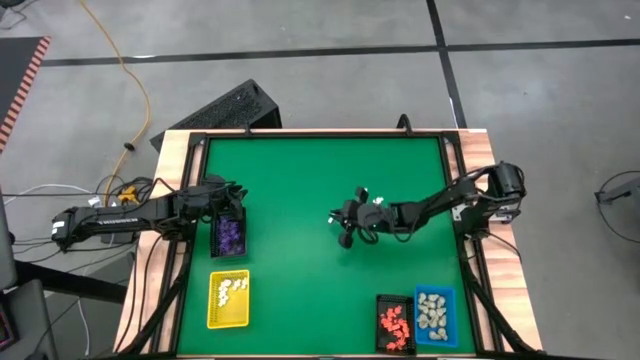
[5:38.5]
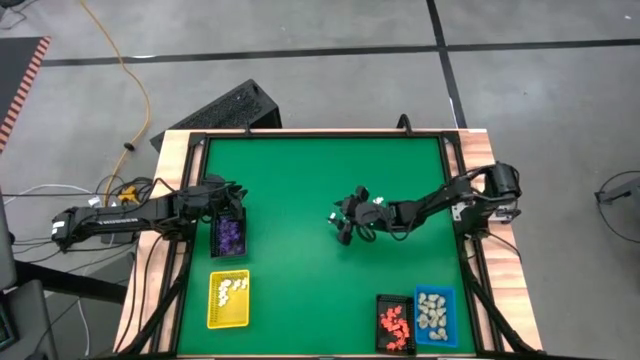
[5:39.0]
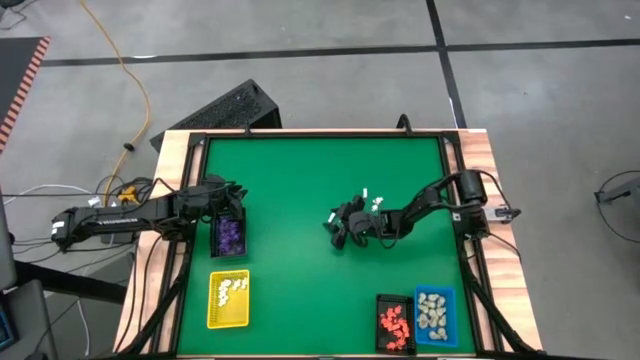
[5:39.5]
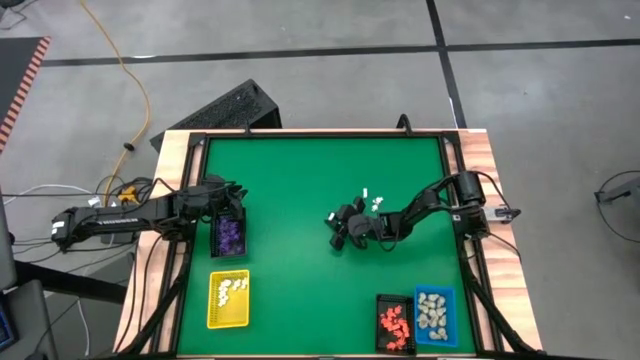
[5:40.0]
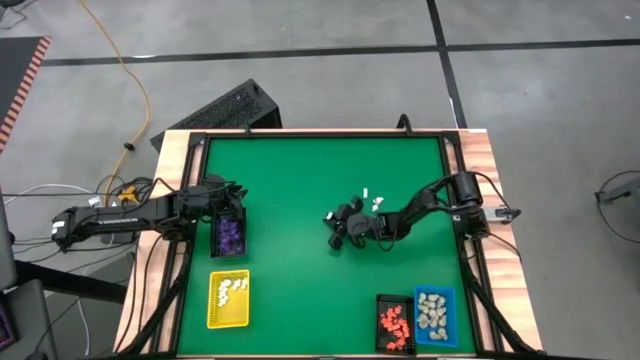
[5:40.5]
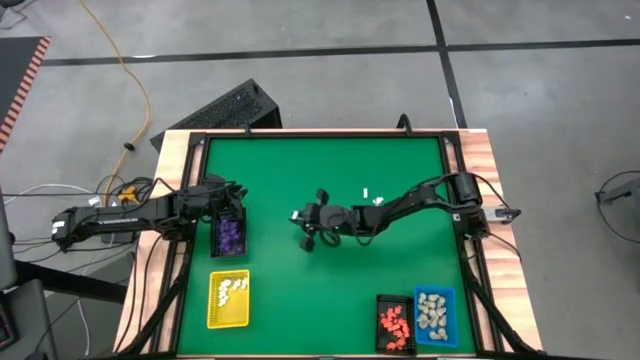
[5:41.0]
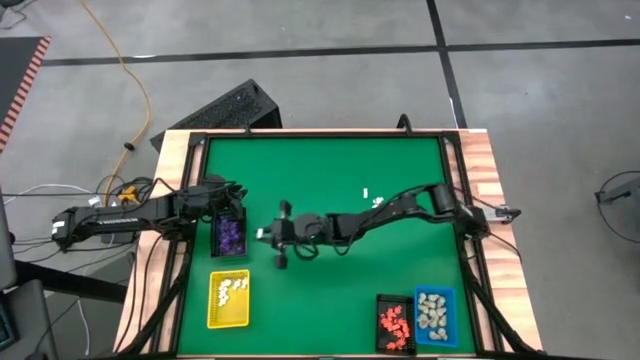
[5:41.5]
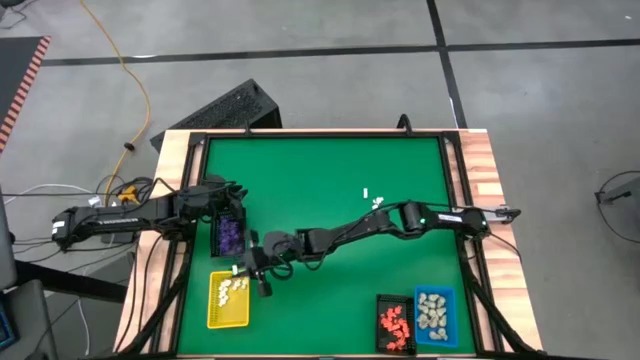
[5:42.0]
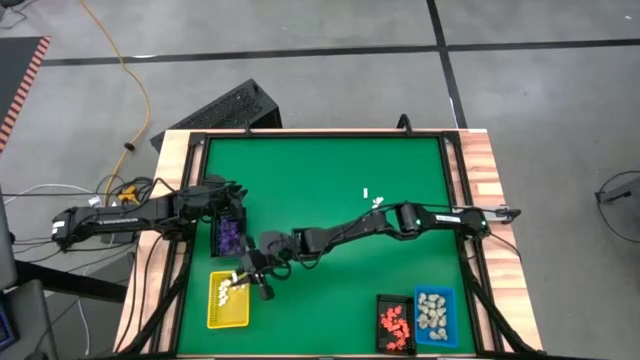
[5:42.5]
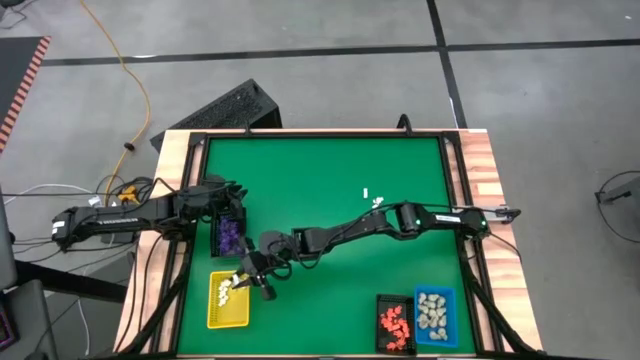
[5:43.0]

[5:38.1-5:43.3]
Task: Sort Halloween decoration
Put the white skeleton toy into the yellow basket

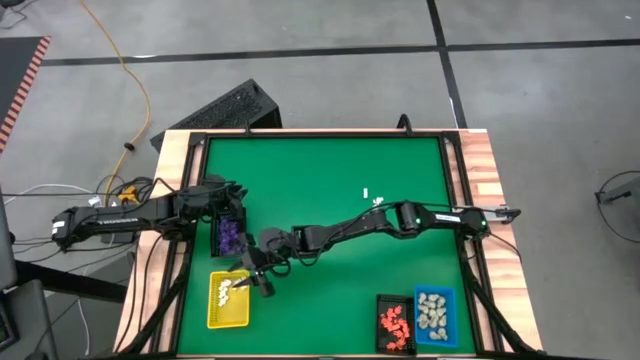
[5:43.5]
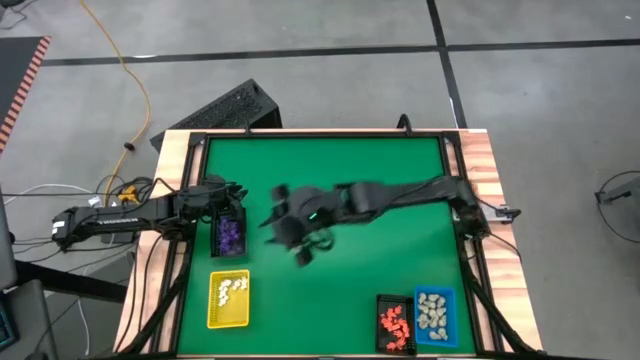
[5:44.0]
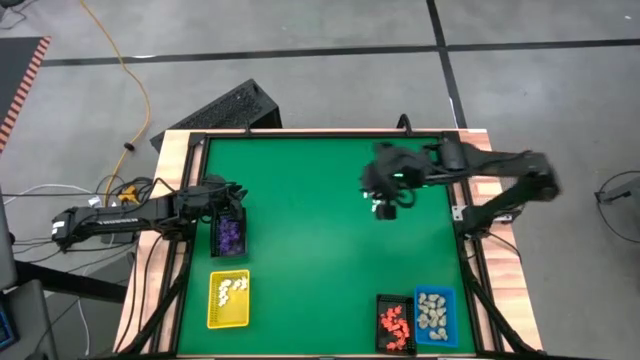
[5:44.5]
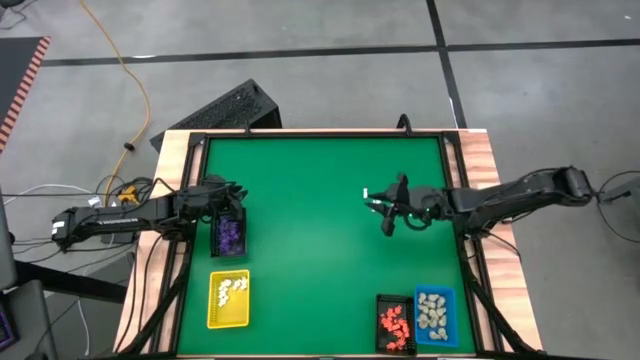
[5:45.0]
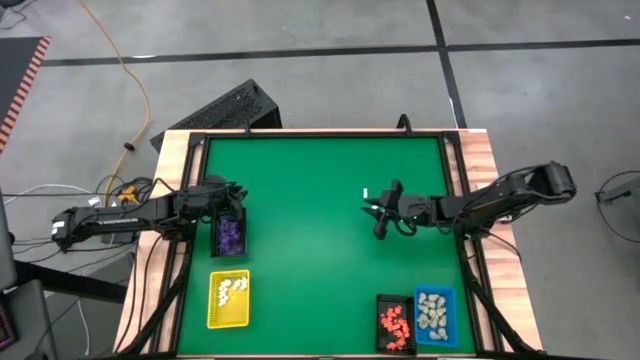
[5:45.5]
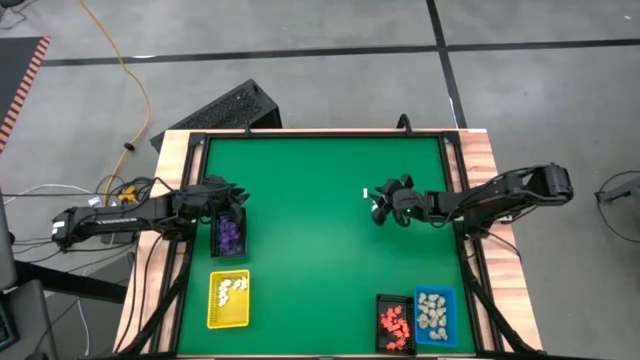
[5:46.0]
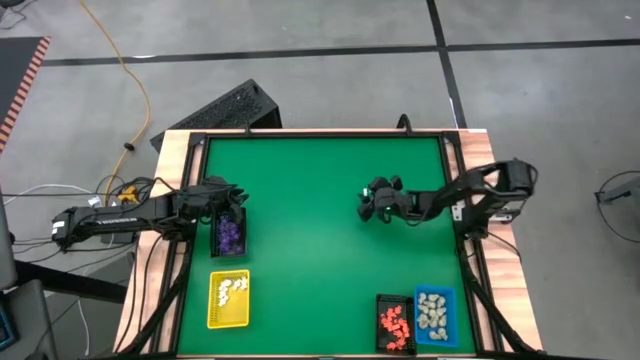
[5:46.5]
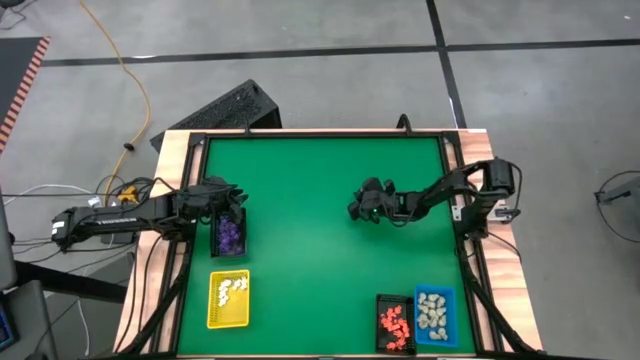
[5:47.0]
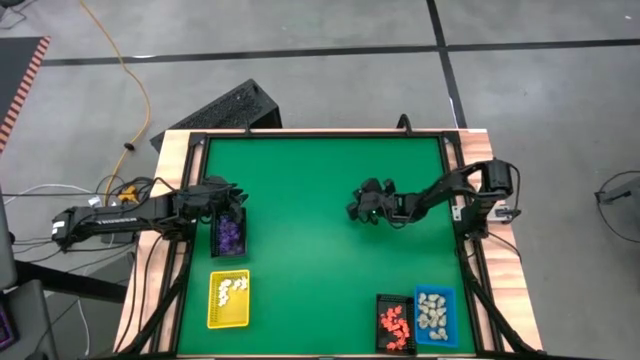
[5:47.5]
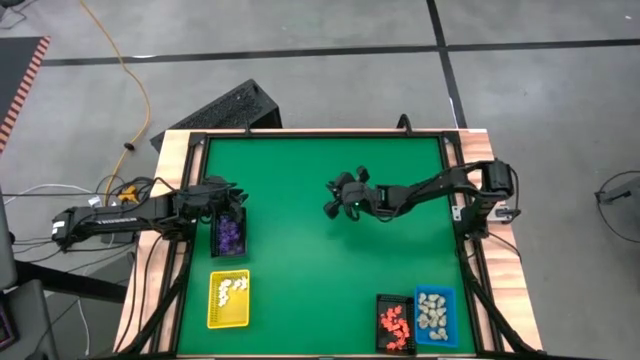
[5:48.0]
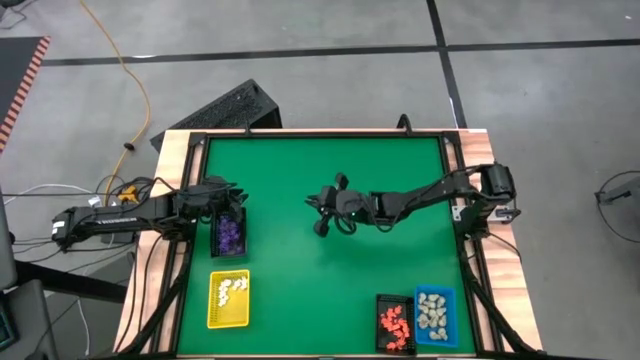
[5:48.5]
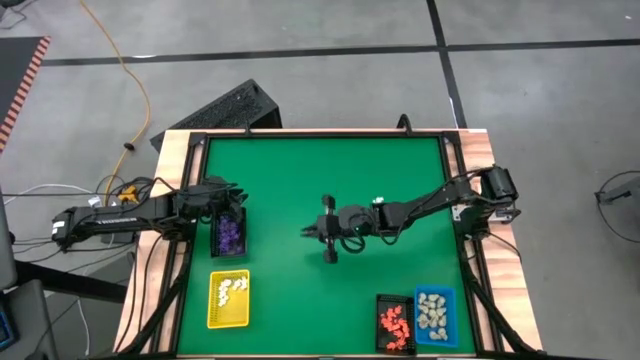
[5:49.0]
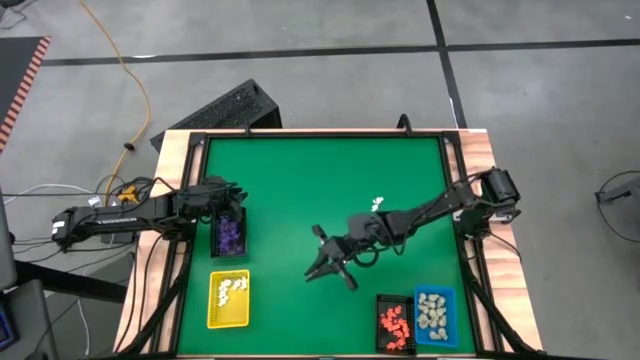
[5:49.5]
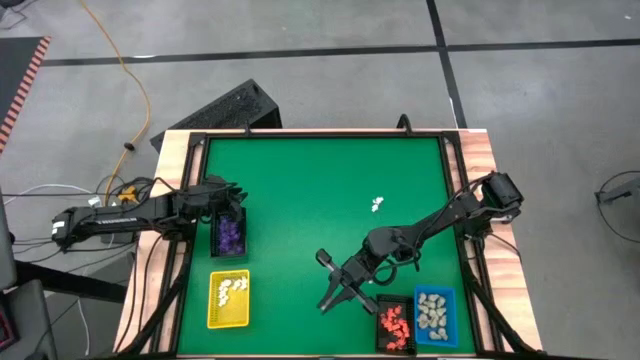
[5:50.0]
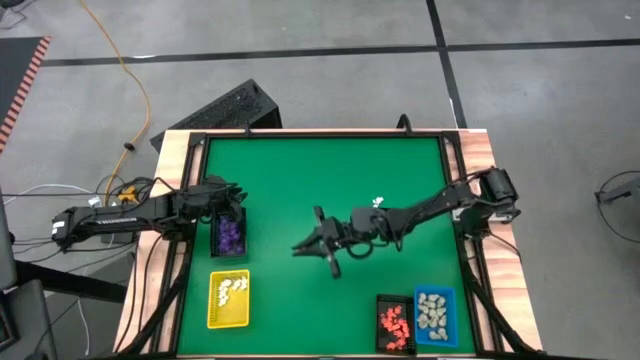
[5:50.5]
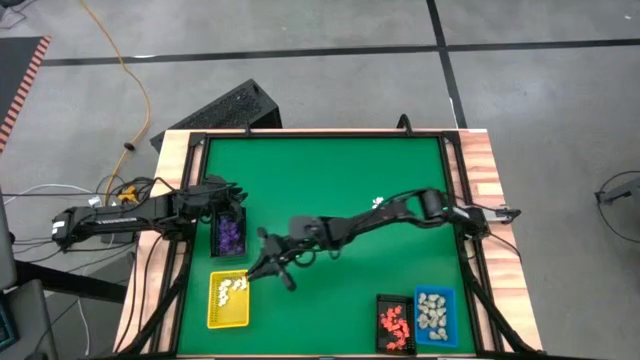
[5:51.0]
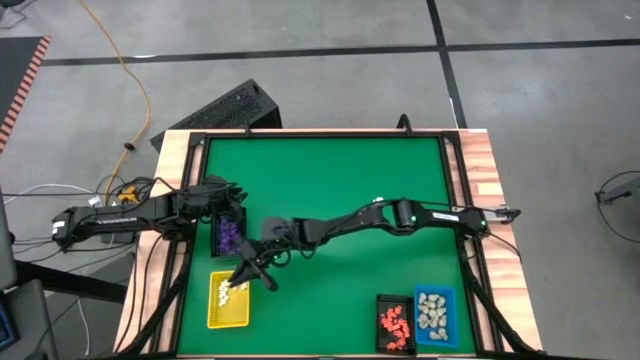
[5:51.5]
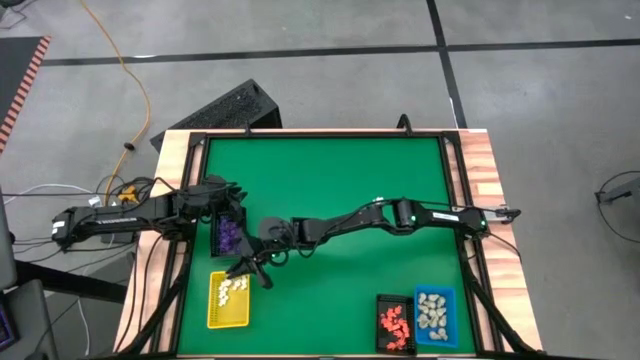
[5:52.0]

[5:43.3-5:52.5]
Put the white skeleton toy into the yellow basket

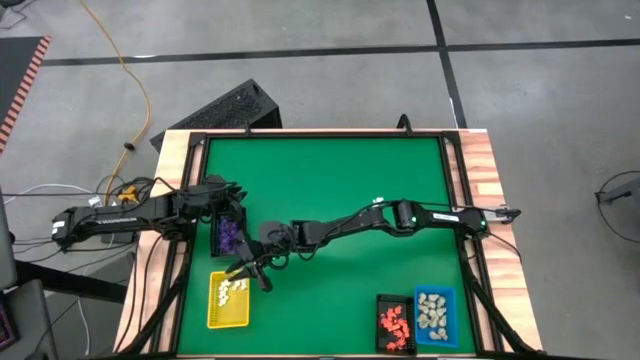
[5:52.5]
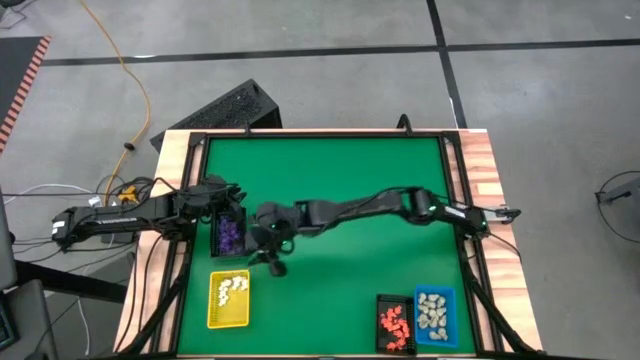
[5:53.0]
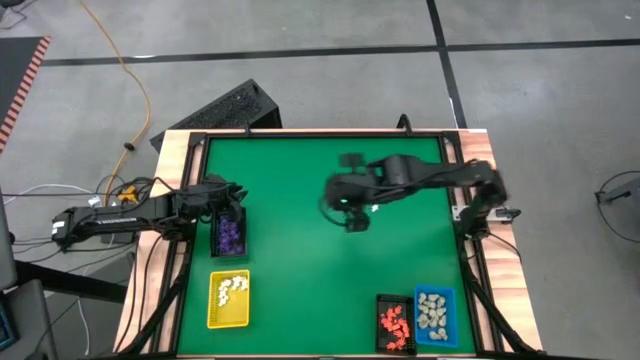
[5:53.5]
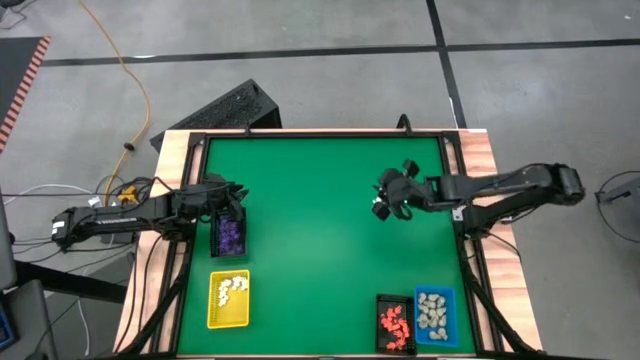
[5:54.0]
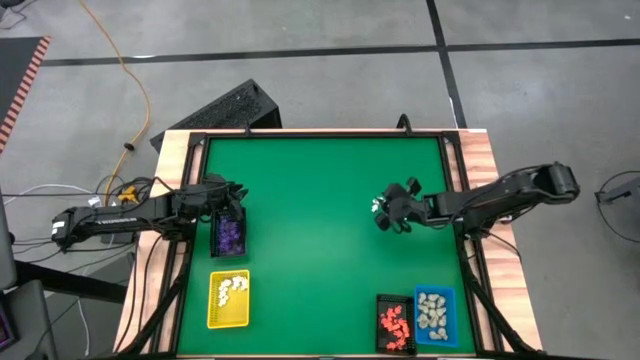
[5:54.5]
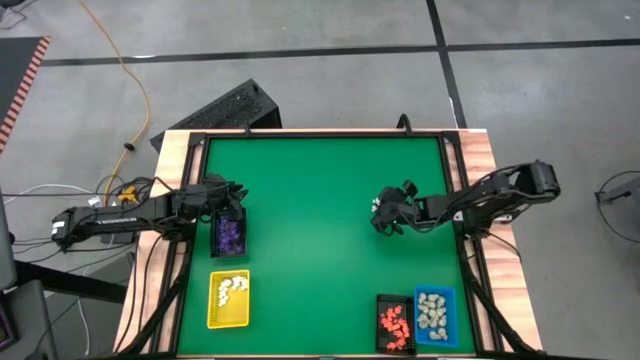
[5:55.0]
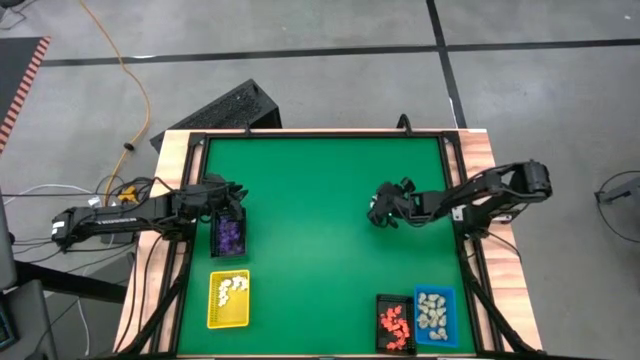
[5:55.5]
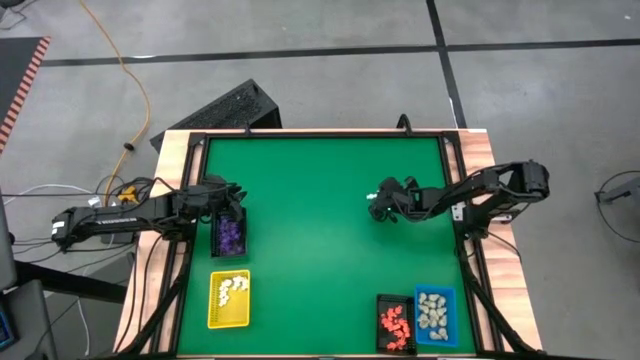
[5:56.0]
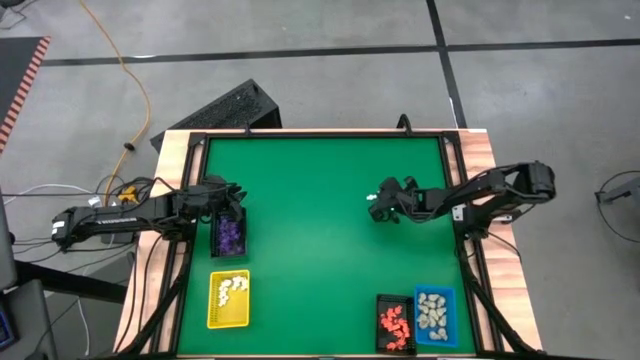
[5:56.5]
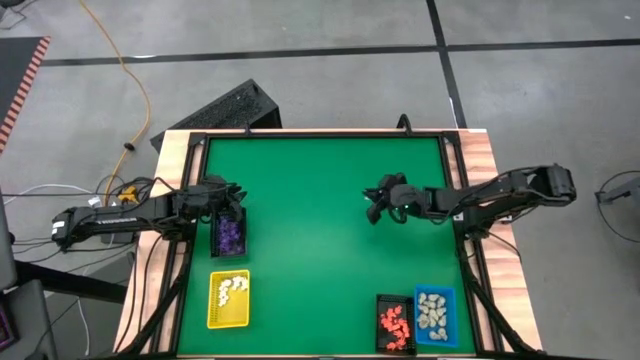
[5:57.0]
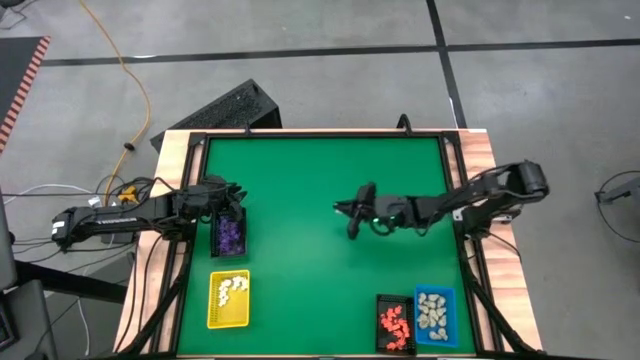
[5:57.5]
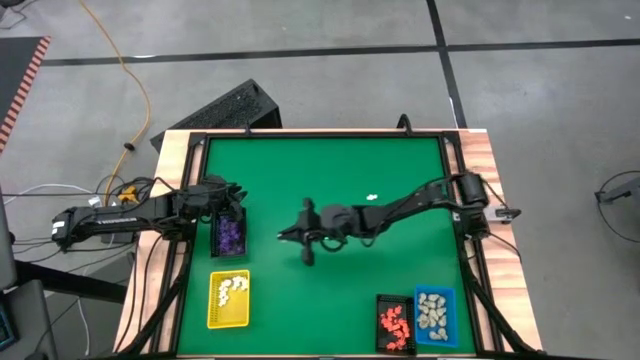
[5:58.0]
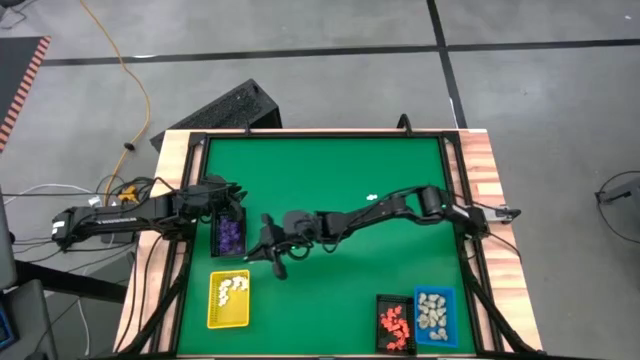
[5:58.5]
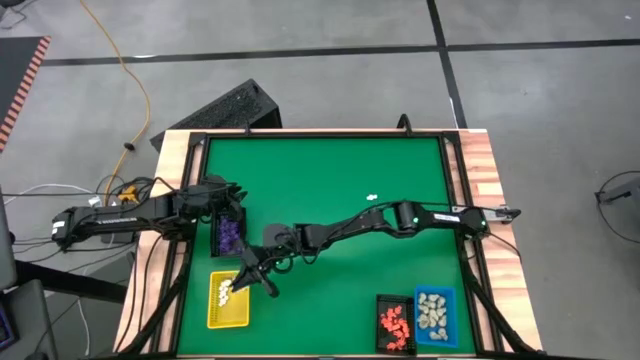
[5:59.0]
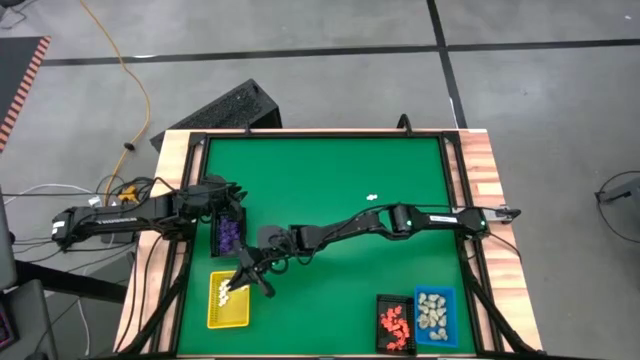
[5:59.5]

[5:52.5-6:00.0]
Put the white skeleton toy into the yellow basket
